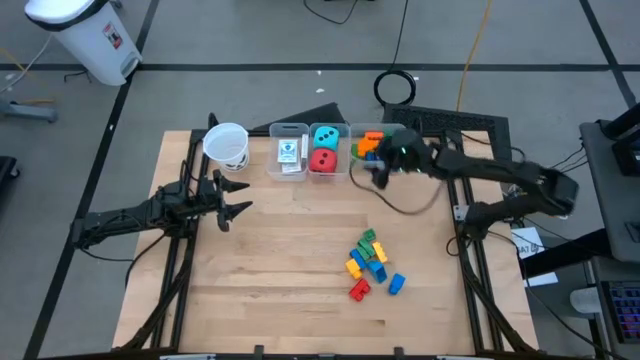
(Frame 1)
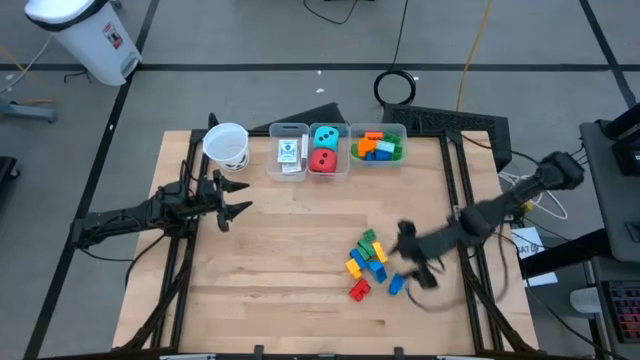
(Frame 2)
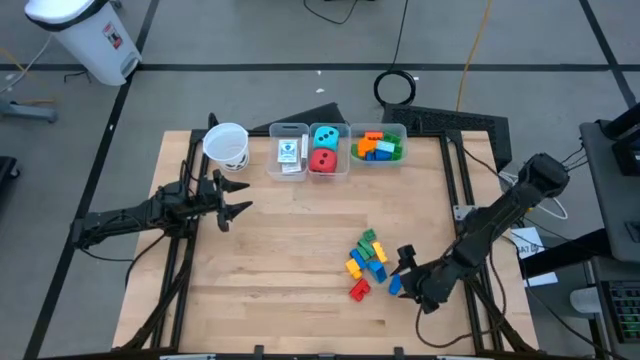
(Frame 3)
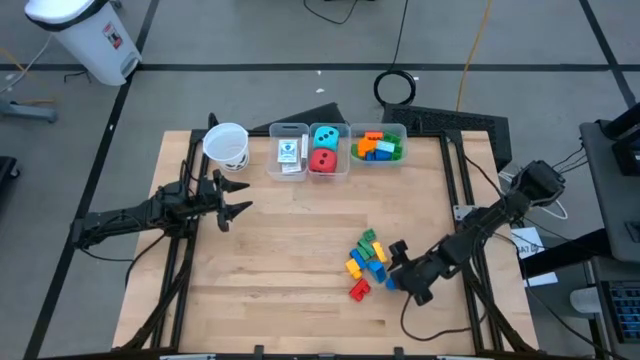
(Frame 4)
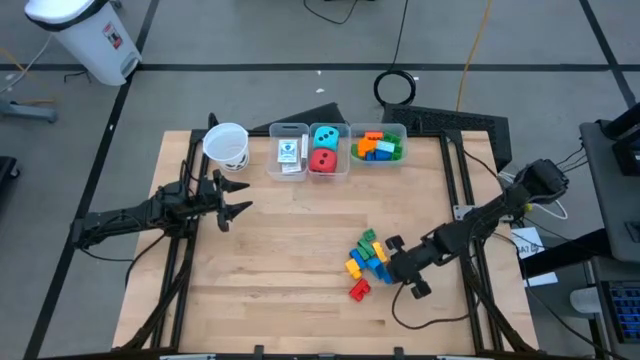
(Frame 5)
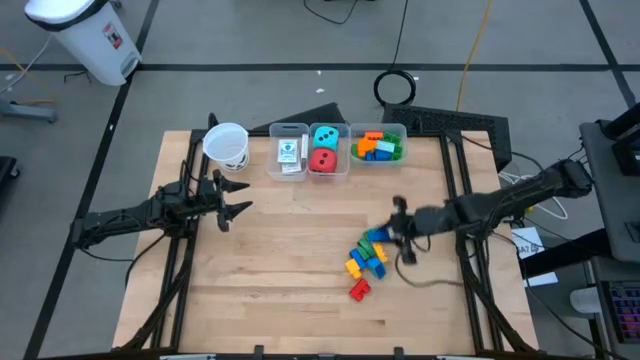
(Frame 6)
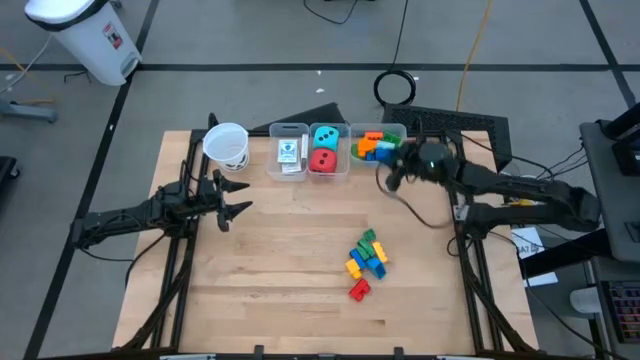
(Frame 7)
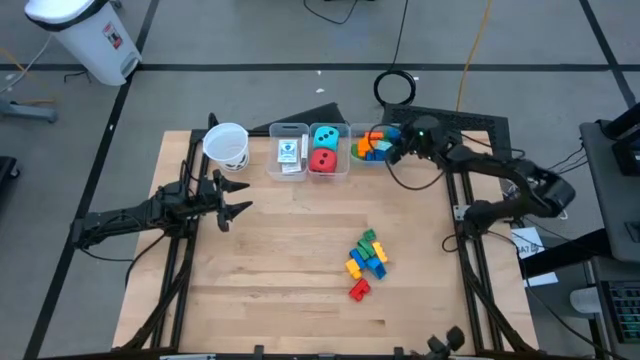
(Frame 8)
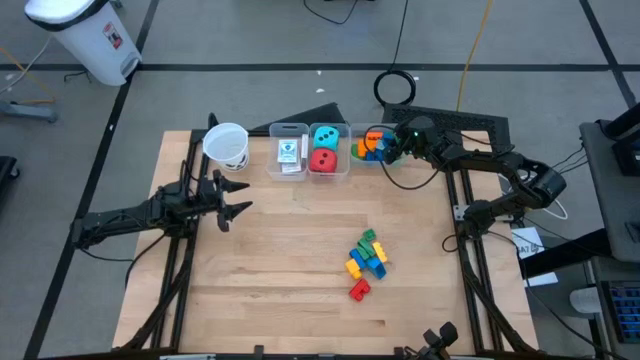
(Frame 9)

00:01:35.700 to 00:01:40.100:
Task: Pick & Place Toys
Put the blue game piece into the right transparent bin

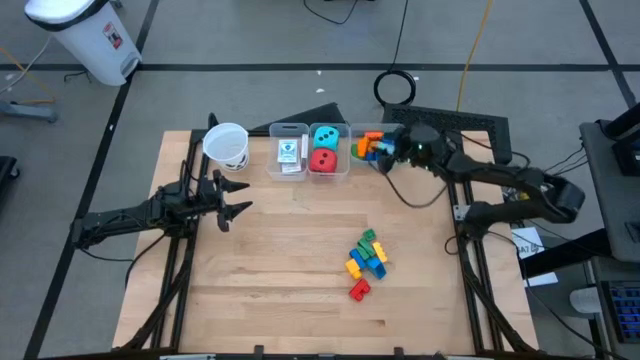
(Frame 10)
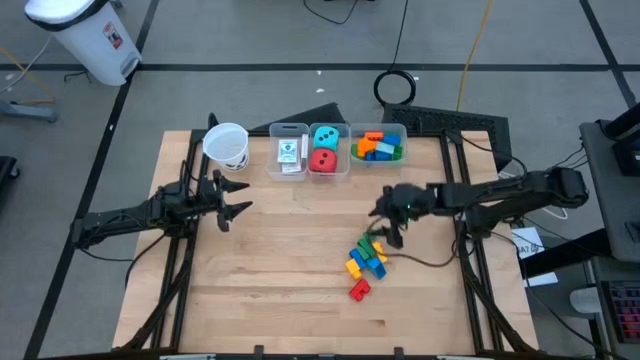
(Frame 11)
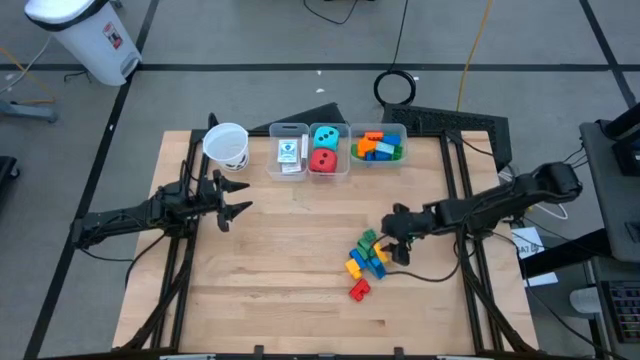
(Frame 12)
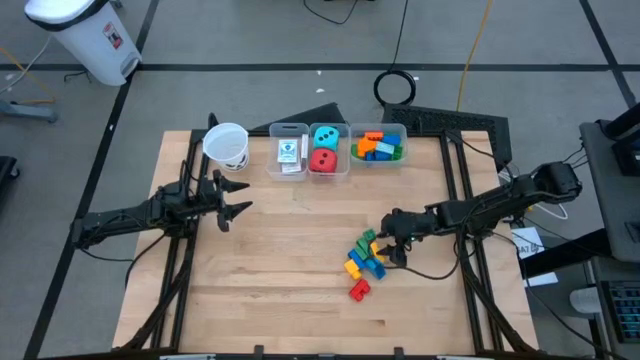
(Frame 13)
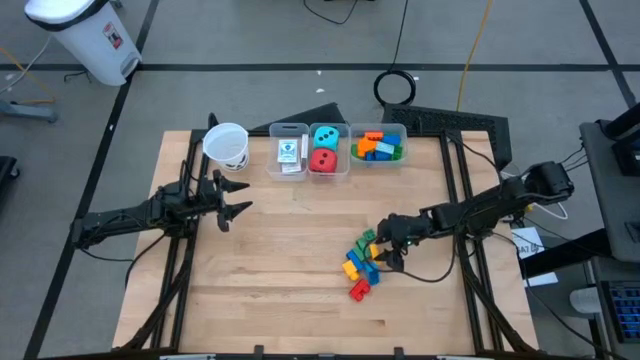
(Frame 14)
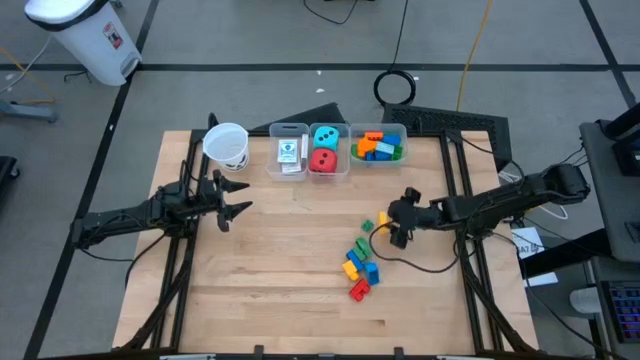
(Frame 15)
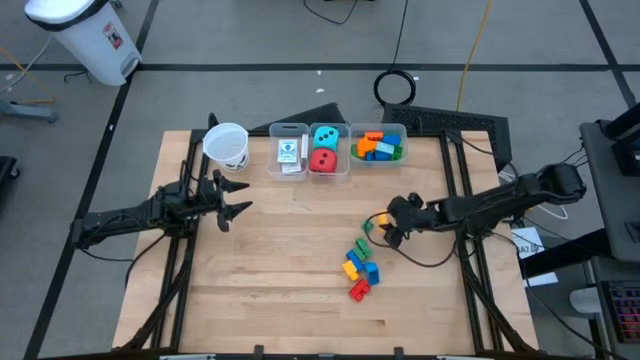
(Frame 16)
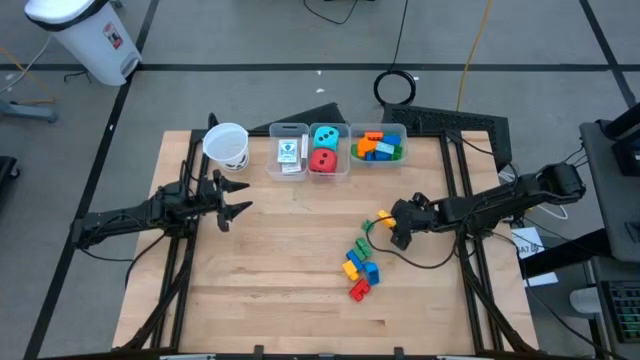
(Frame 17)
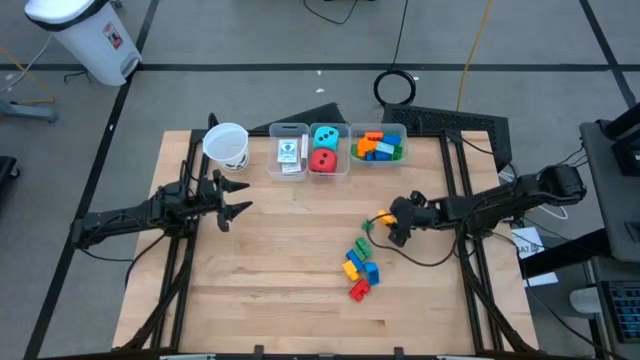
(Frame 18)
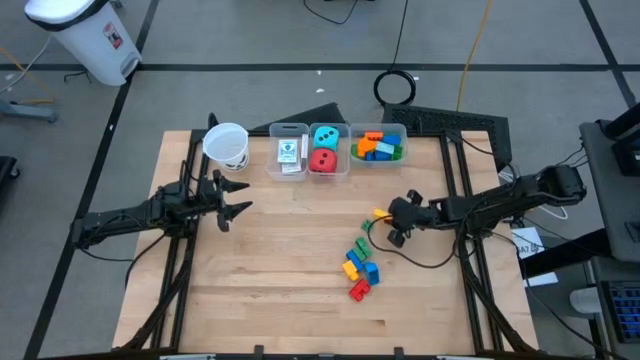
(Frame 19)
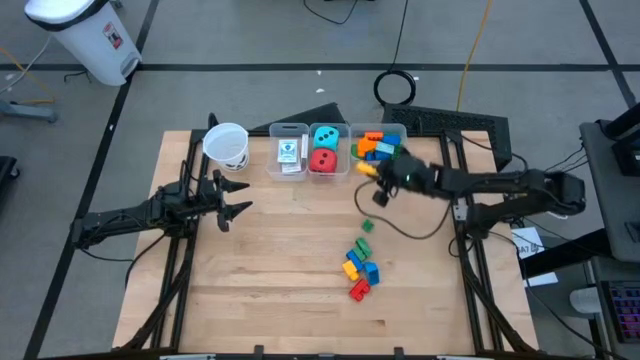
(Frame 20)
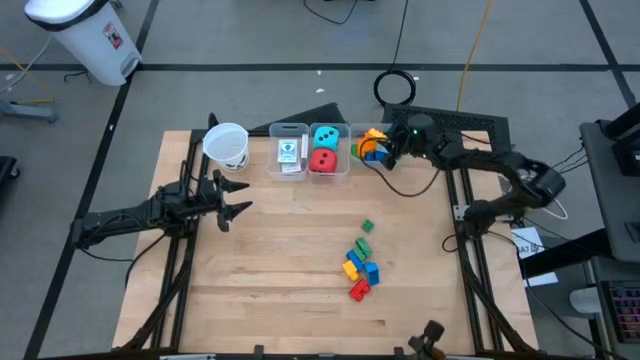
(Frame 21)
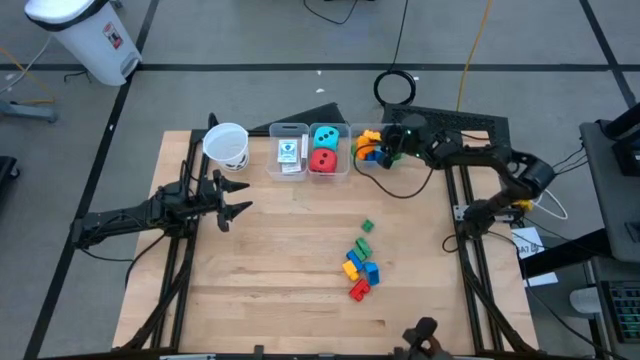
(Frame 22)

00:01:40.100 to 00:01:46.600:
Put the yellow game piece into the right transparent bin

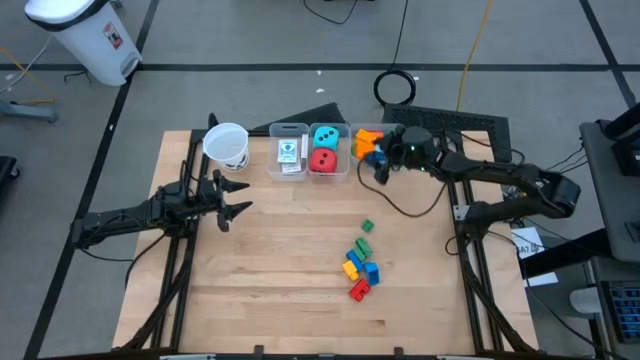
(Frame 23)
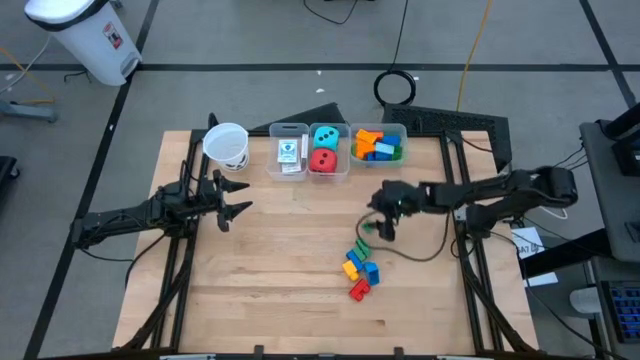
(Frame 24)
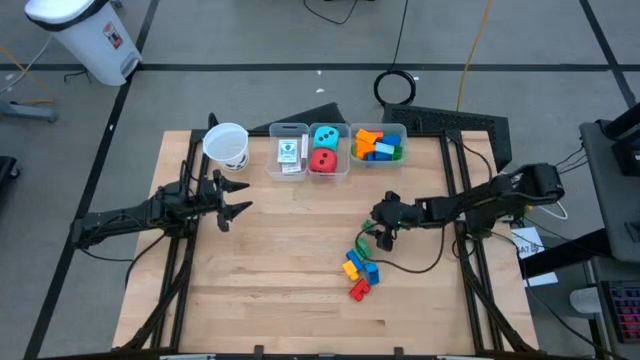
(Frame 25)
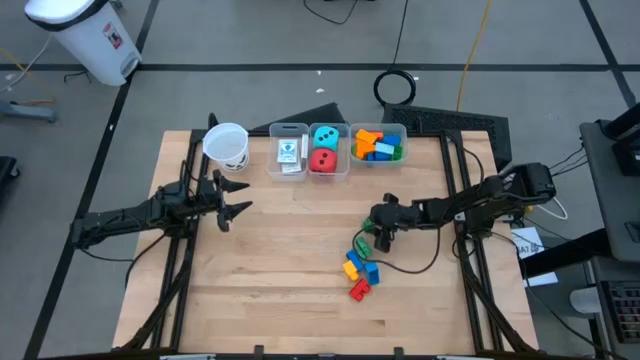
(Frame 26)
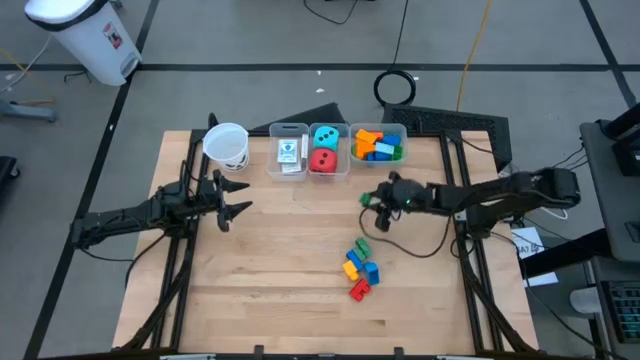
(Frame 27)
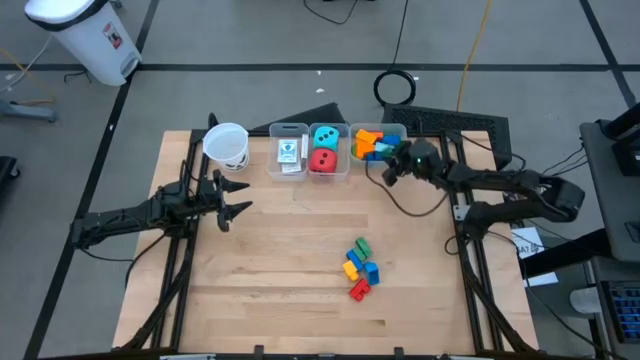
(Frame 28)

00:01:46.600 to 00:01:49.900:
Put the green game piece into the right transparent bin

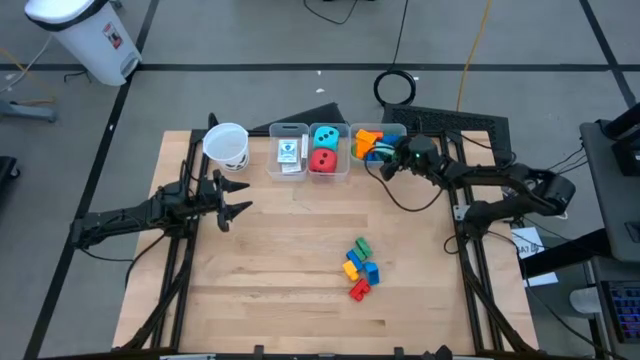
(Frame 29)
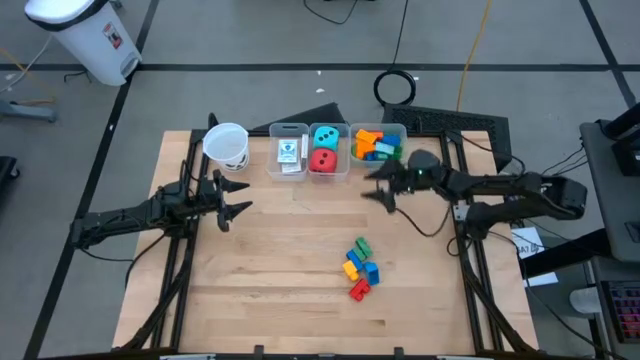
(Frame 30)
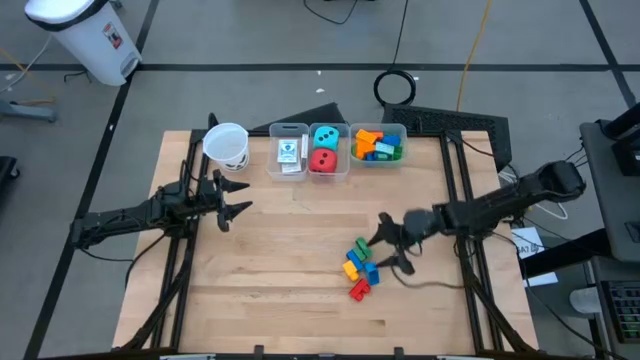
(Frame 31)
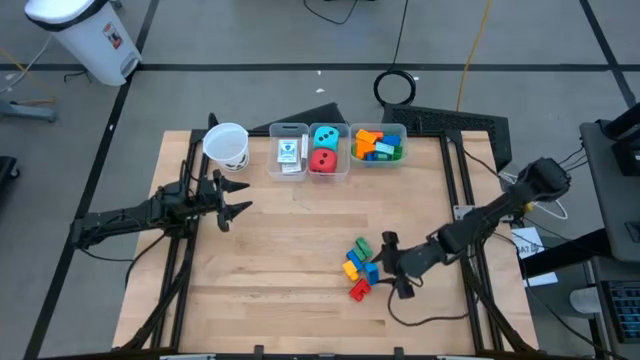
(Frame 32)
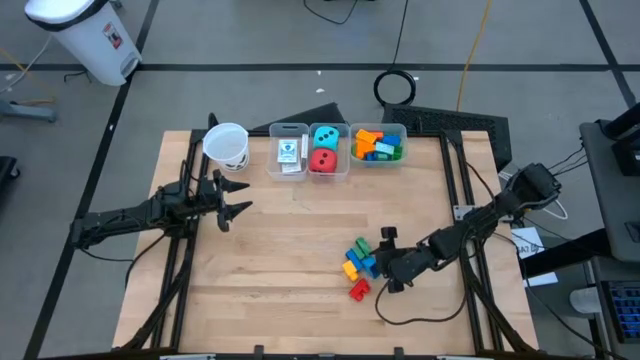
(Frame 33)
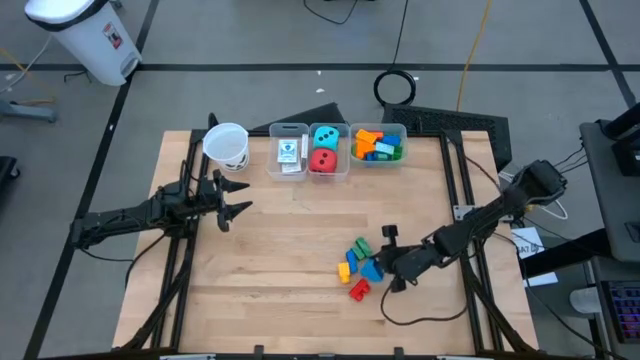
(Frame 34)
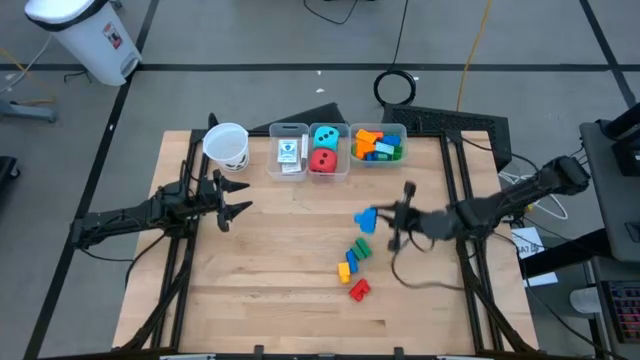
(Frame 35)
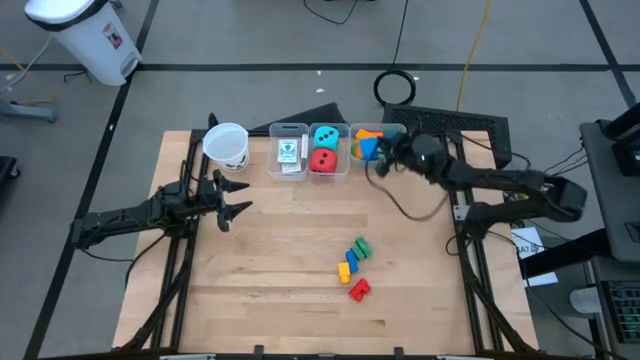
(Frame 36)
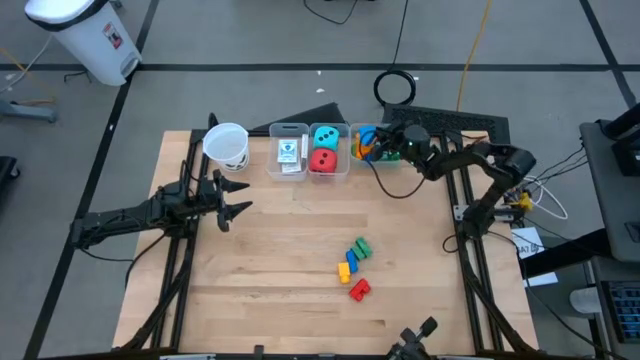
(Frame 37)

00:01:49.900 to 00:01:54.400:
Put the blue game piece into the right transparent bin

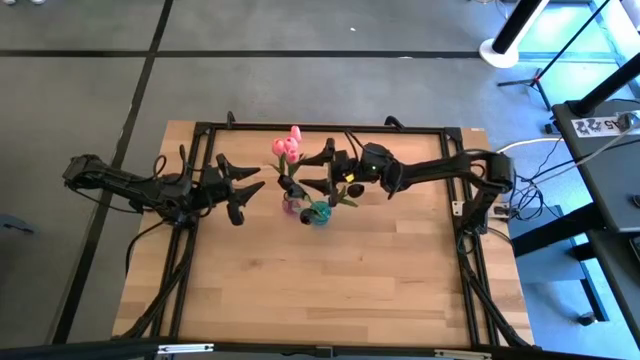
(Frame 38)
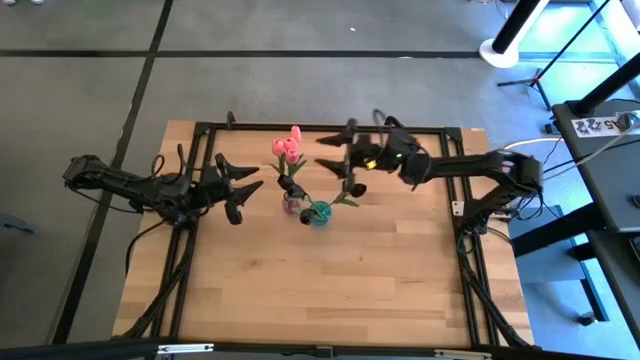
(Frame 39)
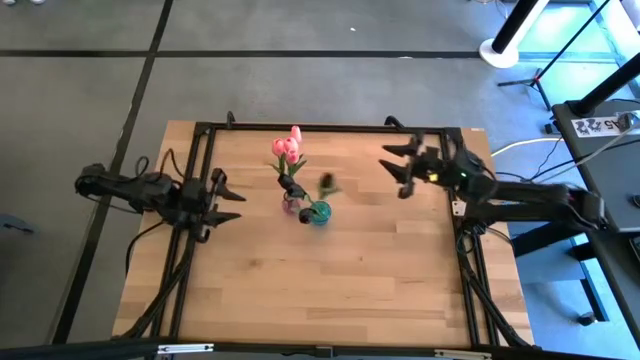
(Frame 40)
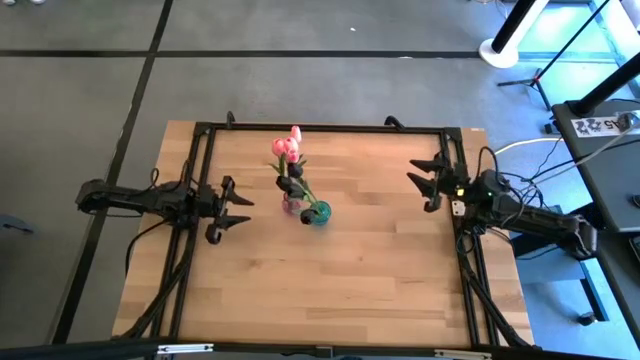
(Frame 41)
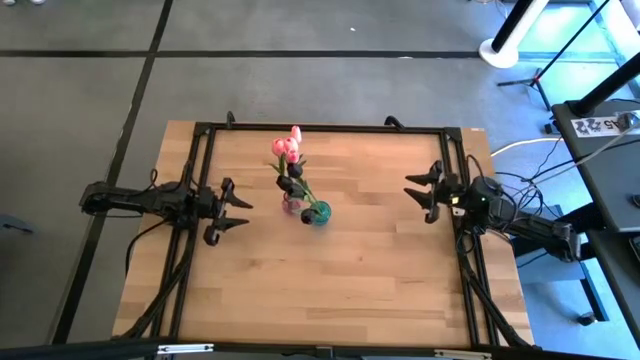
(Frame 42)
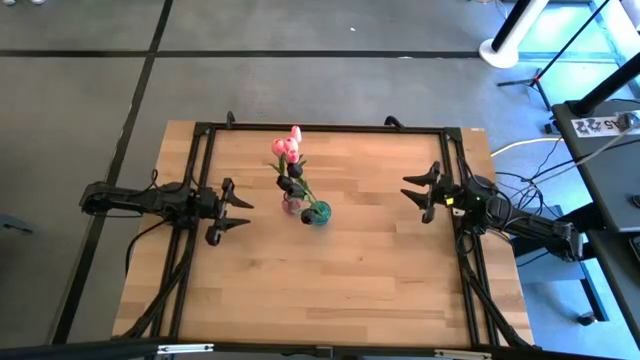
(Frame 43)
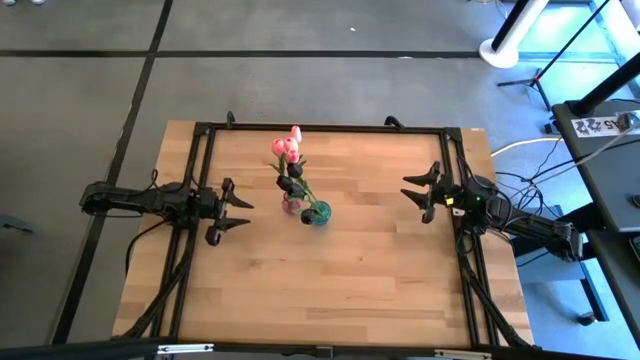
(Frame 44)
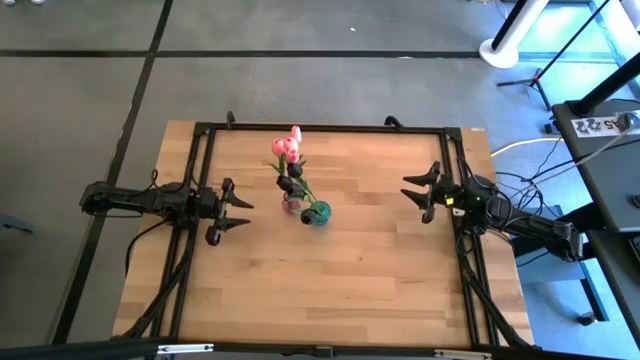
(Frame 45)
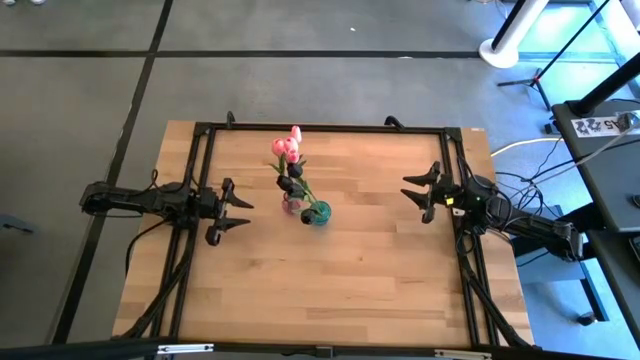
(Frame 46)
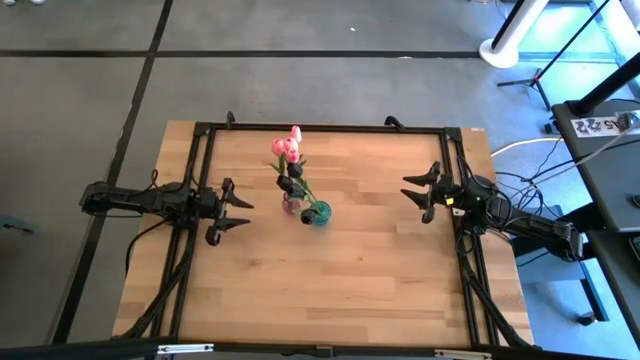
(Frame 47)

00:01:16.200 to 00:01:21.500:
Task: Sort flowers into vase by color
Return to Home Position
